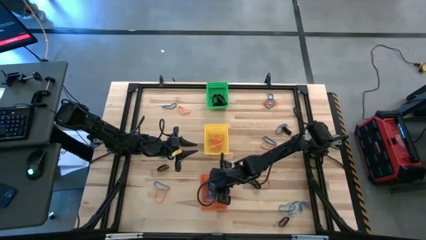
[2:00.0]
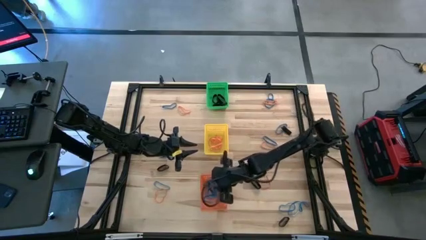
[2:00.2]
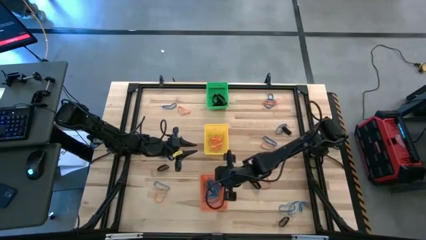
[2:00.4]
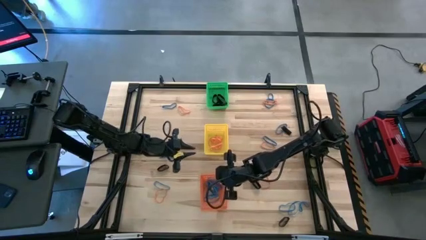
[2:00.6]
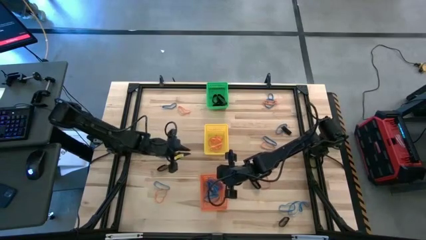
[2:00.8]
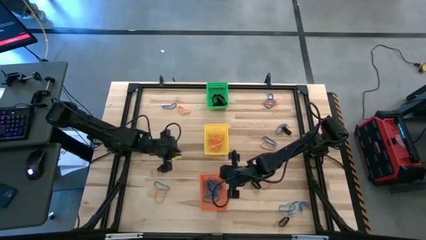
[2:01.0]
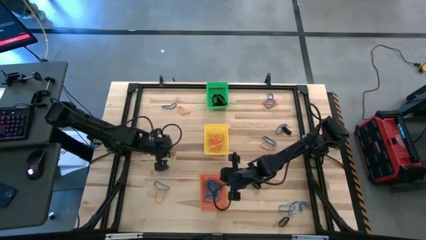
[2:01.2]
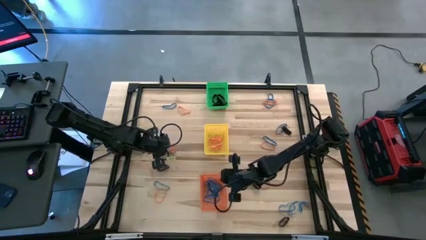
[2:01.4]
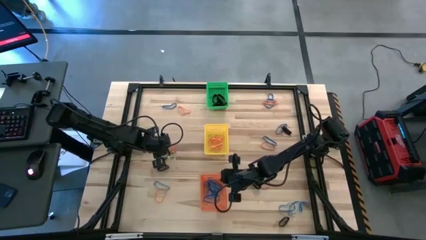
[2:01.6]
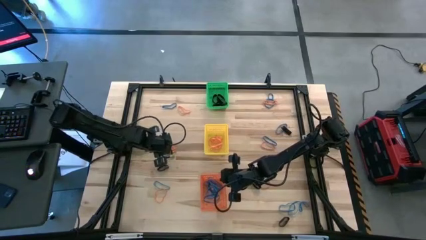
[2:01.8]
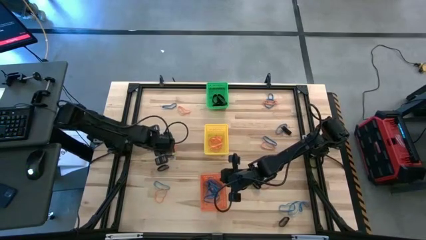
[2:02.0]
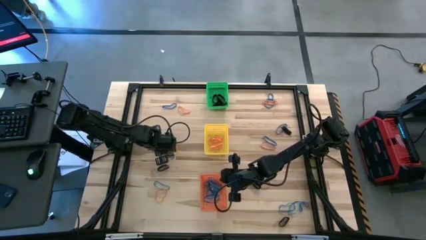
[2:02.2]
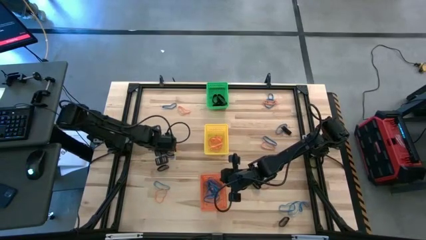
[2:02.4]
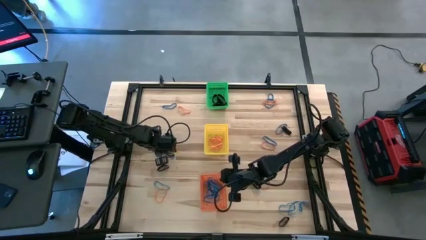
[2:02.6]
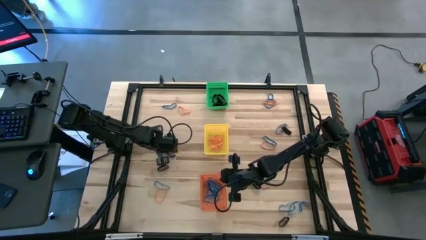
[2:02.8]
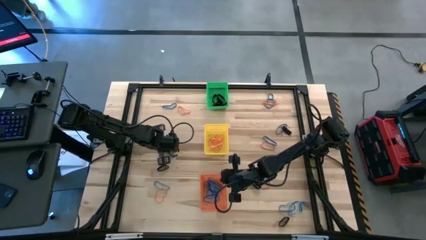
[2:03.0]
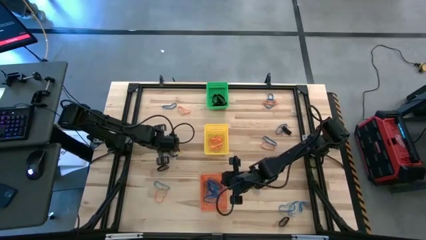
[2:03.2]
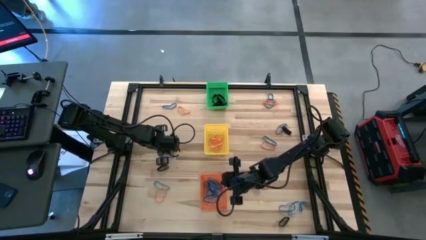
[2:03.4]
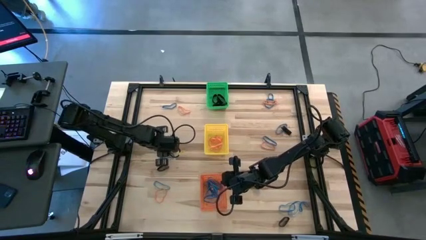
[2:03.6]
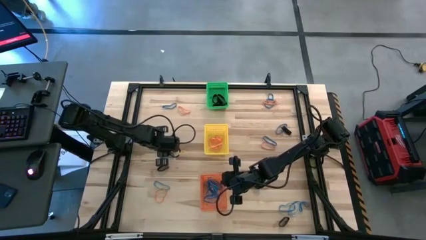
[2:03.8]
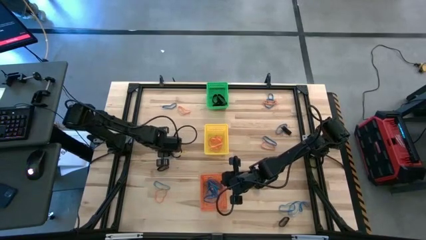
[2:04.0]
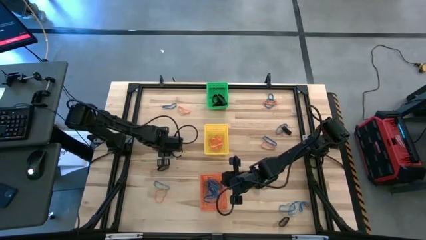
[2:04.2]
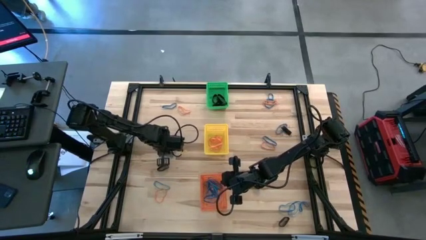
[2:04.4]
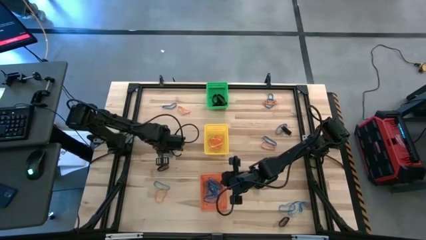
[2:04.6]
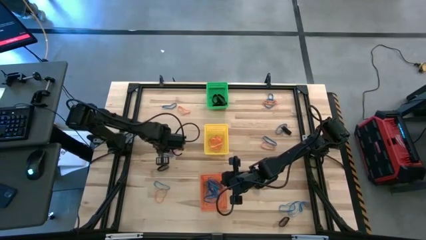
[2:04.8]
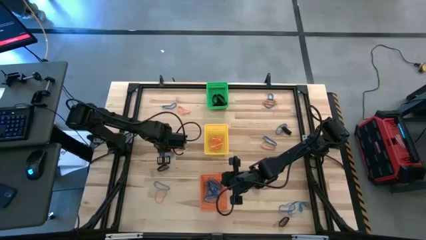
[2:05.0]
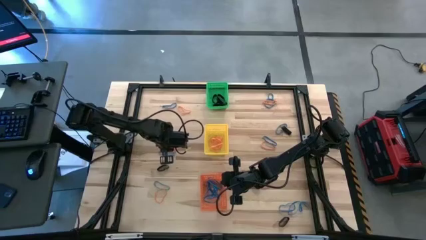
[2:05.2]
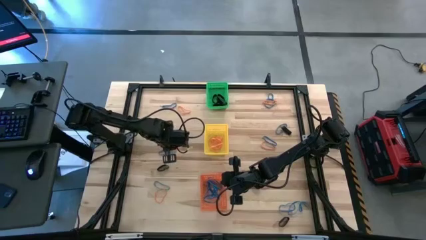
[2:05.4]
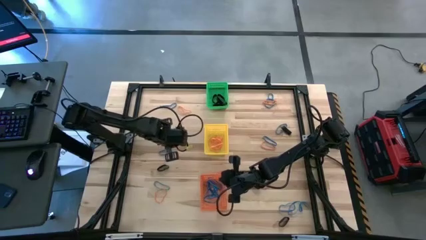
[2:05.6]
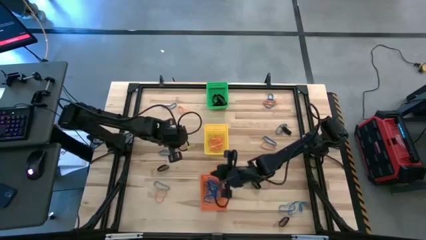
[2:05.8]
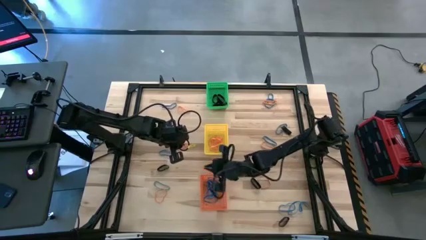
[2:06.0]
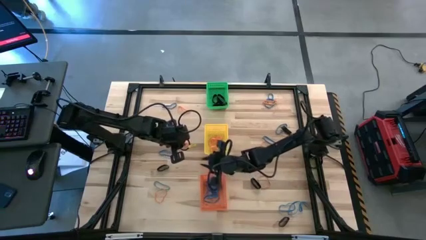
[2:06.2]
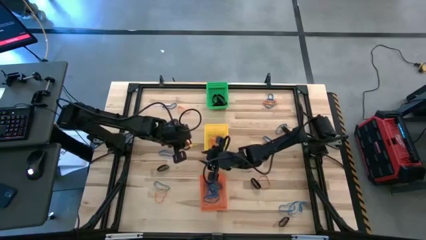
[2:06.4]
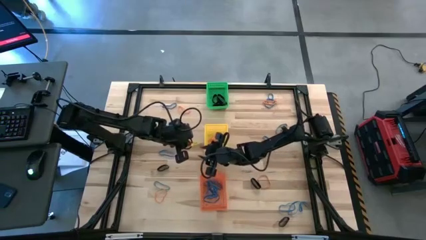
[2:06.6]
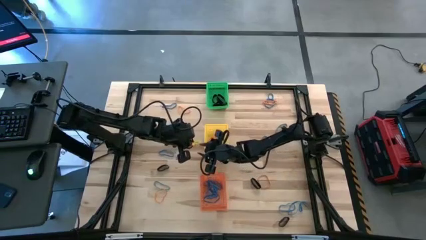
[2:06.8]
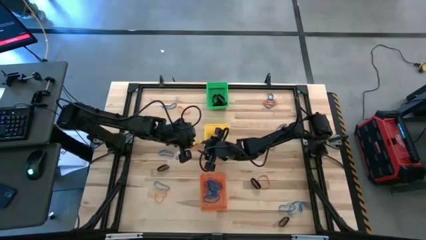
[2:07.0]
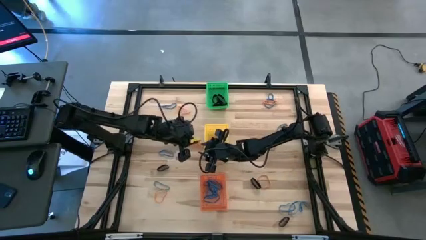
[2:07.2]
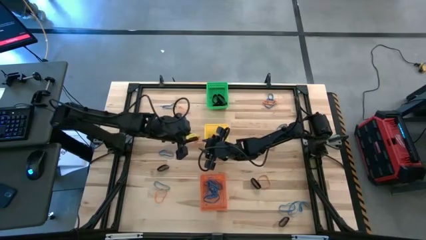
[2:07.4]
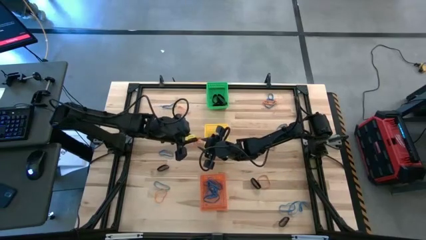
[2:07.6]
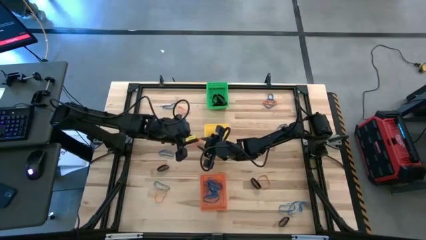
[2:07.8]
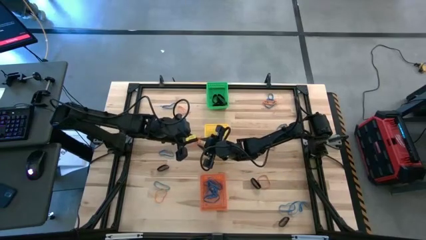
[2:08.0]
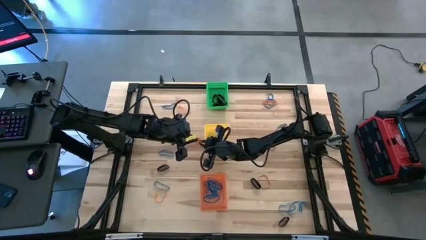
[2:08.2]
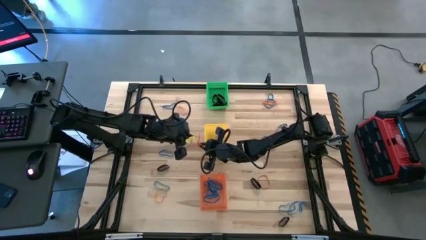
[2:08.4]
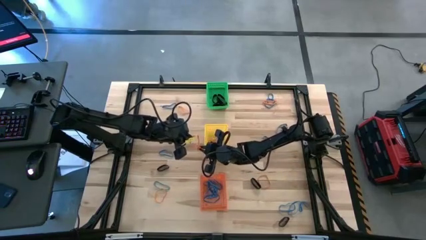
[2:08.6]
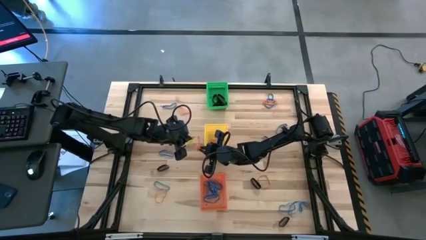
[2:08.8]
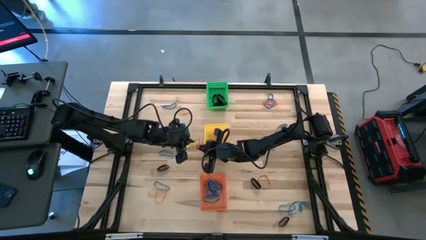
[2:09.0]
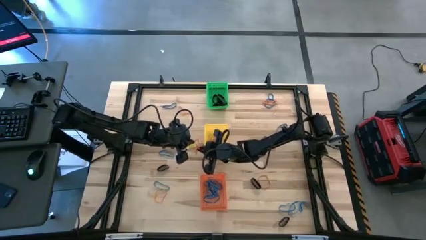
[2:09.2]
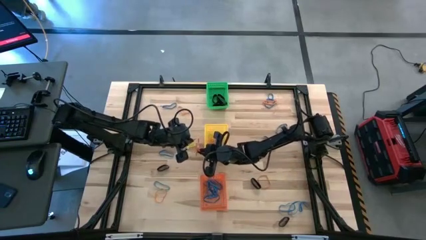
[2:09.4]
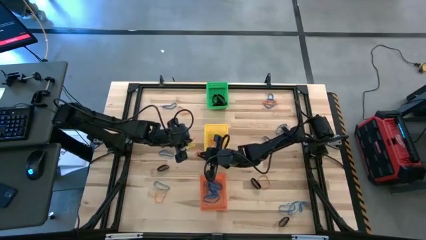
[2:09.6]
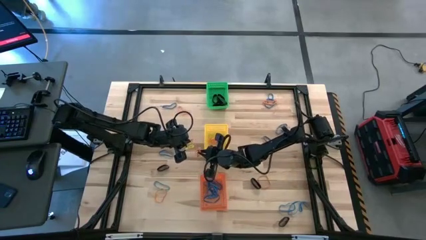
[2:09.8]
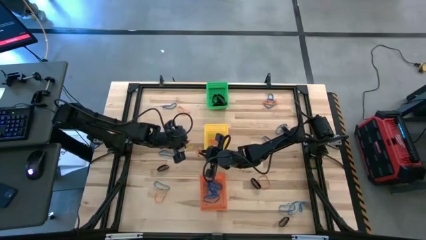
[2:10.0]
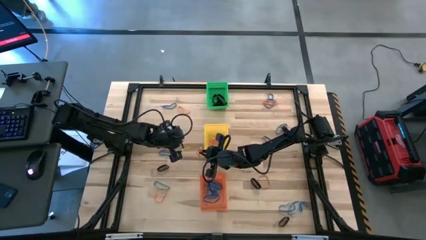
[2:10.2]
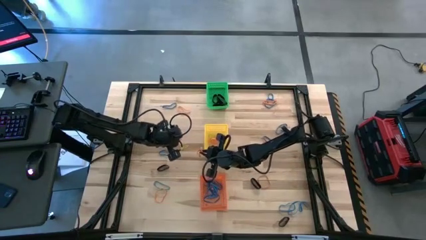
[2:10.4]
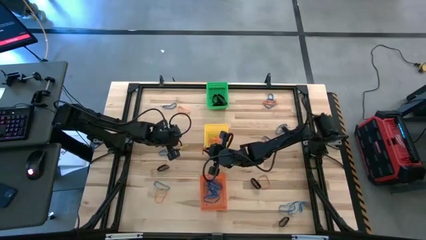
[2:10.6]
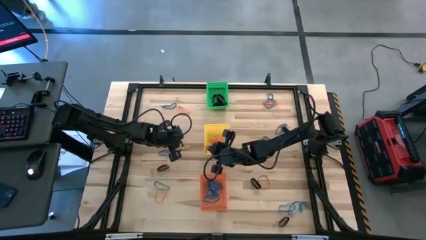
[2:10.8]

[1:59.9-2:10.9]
Task: Sort rubber bands into baskets
Put the orange rubber band into the yellow bin

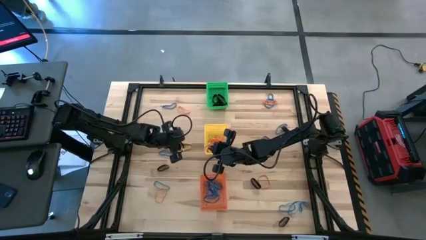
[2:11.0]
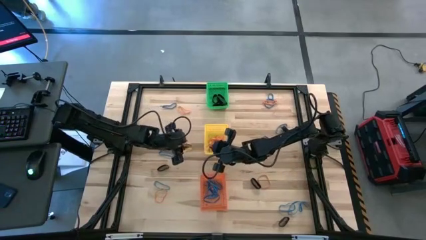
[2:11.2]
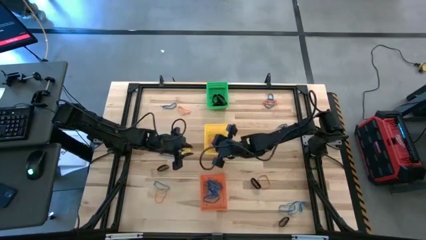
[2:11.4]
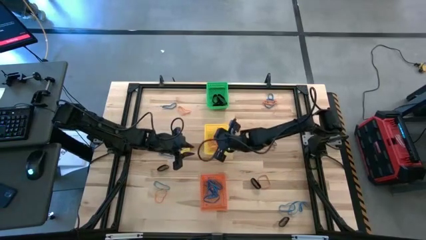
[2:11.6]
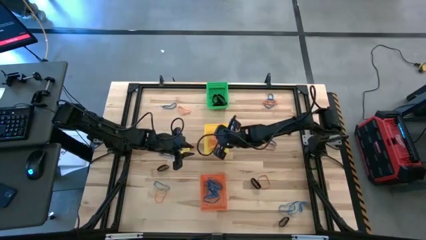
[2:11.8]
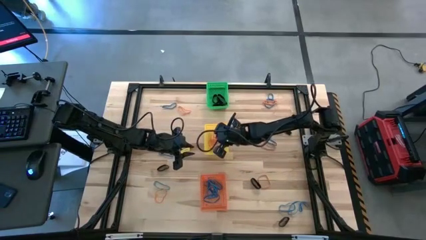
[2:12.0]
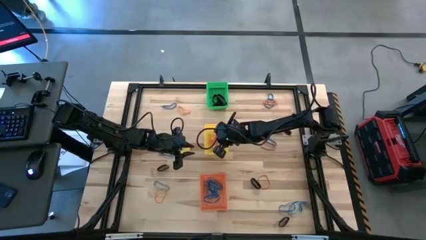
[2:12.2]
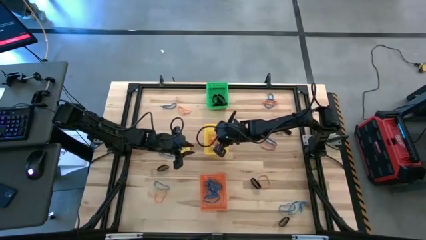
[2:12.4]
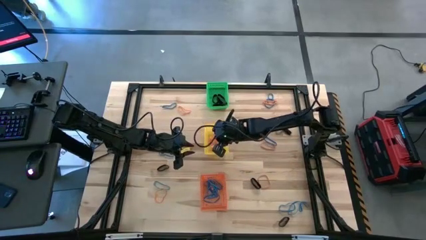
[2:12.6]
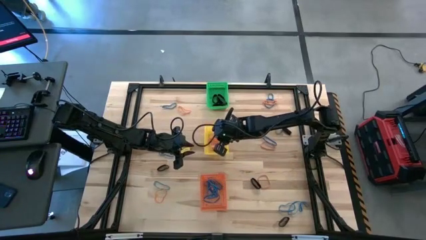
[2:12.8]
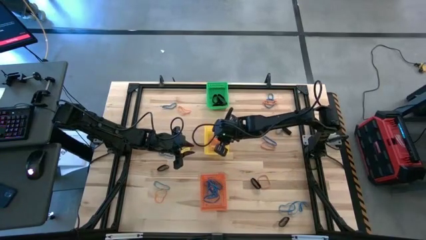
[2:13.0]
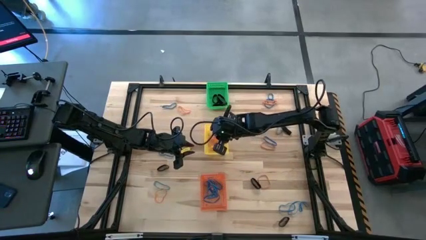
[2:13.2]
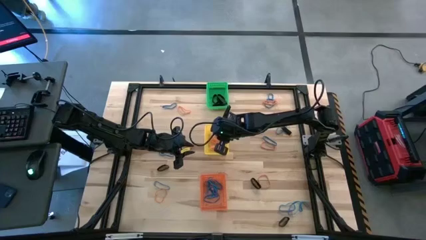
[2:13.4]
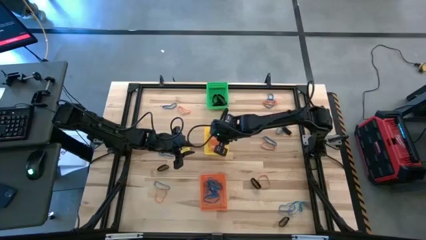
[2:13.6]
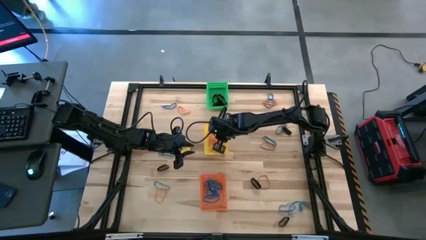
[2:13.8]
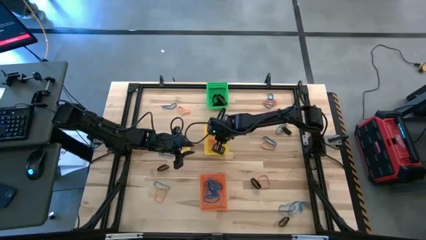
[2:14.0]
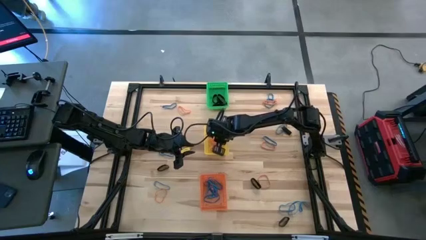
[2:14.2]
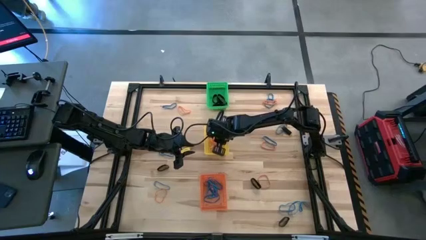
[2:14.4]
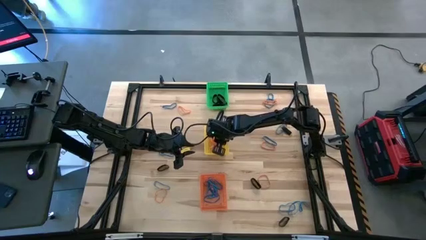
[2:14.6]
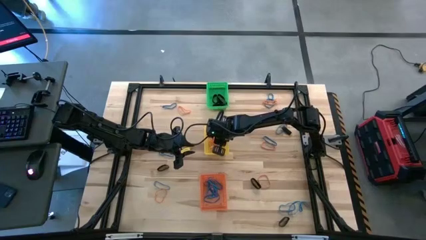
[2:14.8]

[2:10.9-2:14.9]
Put the orange rubber band into the yellow bin

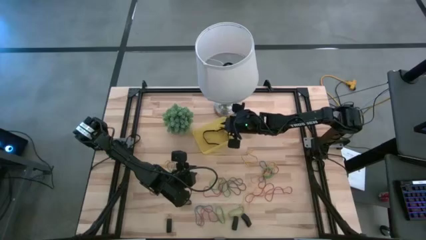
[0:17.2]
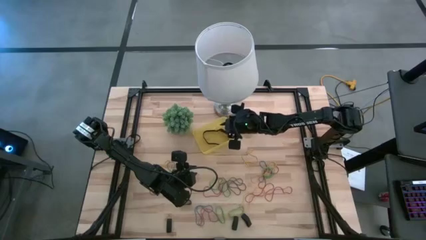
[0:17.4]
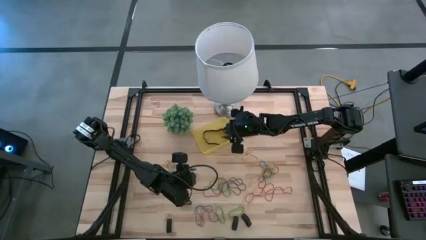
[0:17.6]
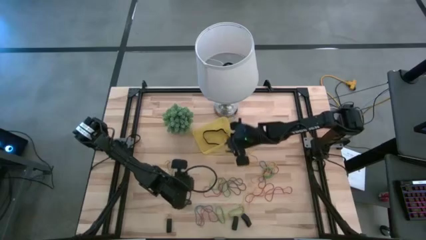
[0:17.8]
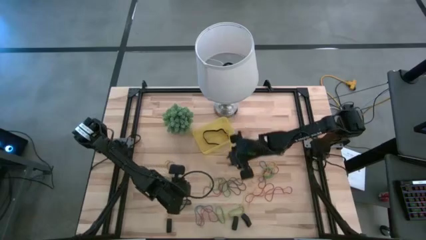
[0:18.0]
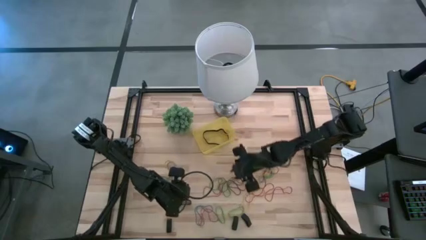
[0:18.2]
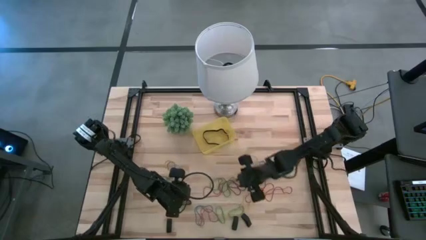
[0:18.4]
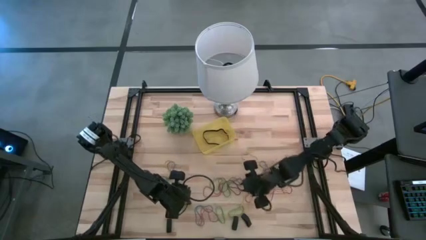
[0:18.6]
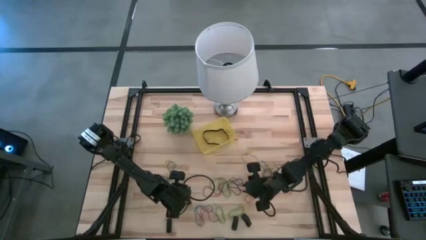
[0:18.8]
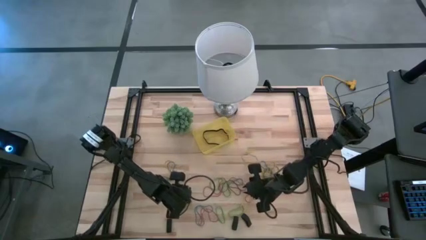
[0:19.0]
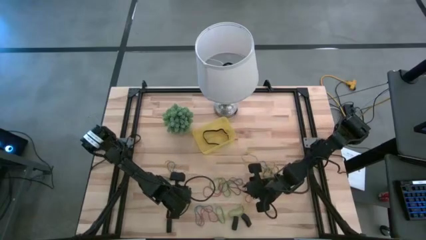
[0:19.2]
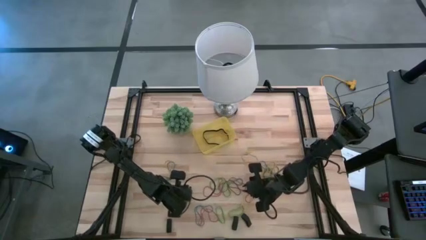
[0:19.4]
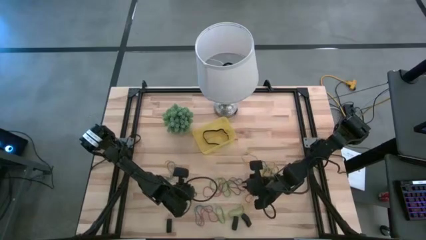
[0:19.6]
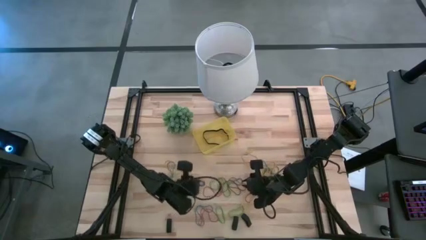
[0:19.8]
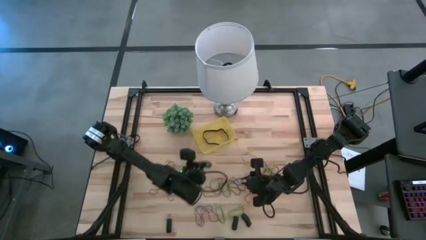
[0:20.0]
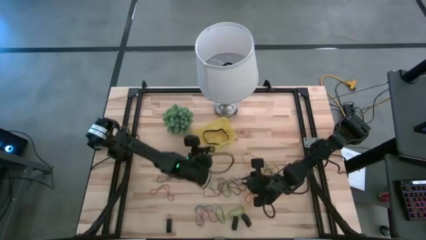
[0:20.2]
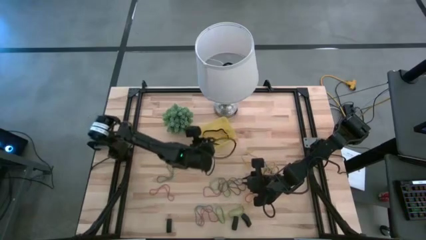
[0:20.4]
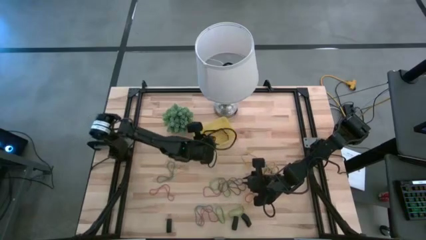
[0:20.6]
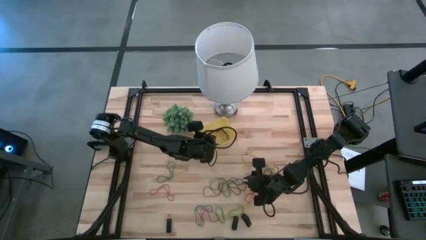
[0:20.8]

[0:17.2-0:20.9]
Task: Pick and place rubber bands into bin
Put the black rubber band into the yellow bin
